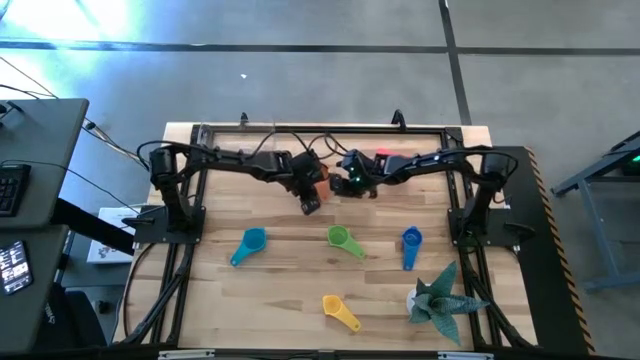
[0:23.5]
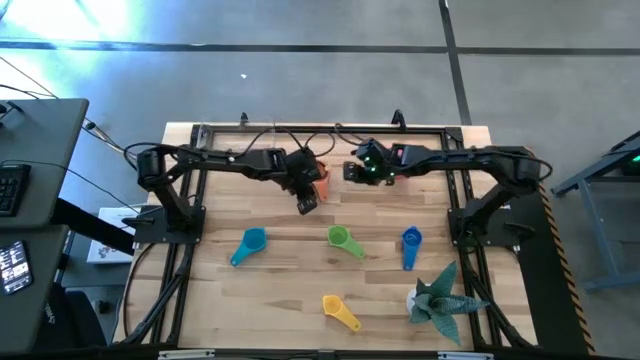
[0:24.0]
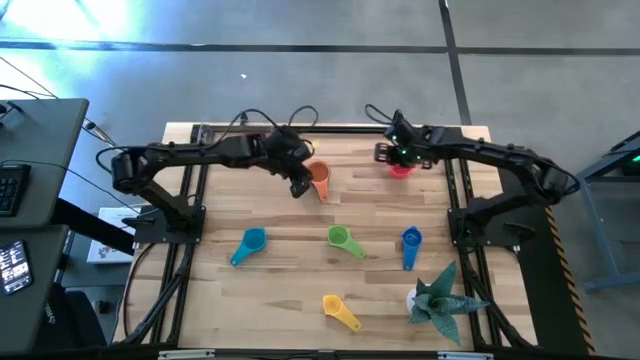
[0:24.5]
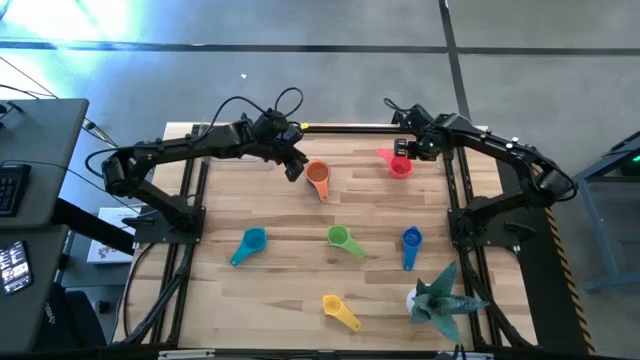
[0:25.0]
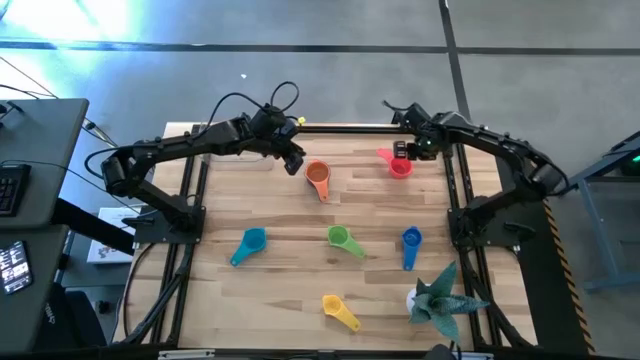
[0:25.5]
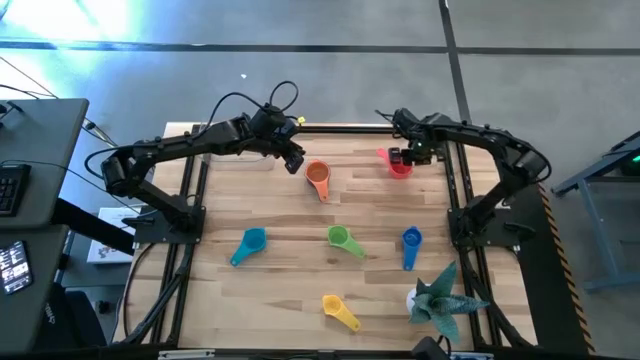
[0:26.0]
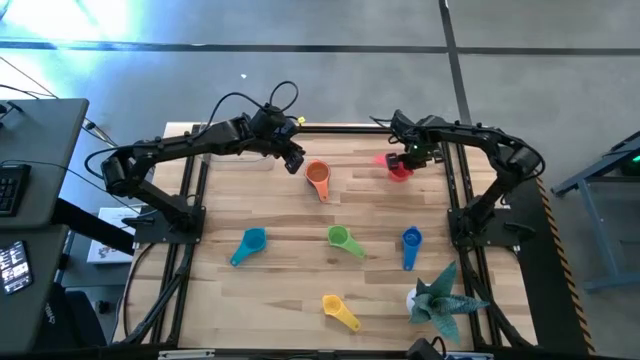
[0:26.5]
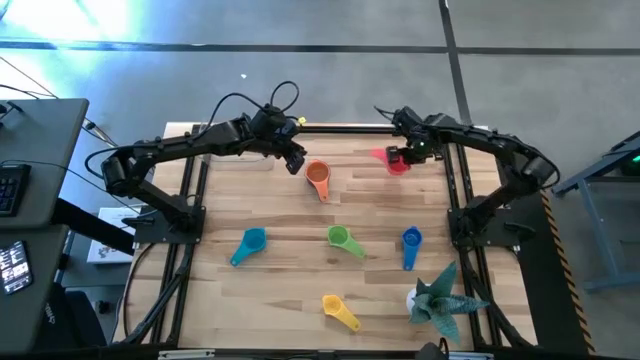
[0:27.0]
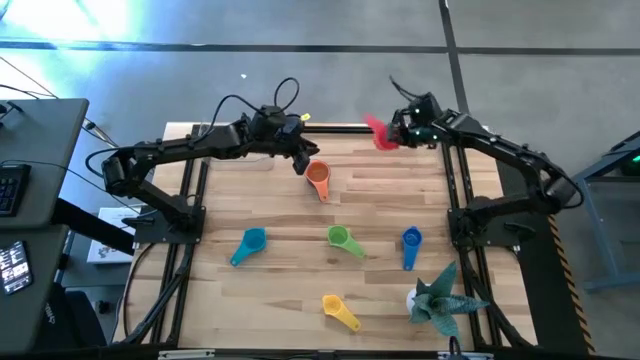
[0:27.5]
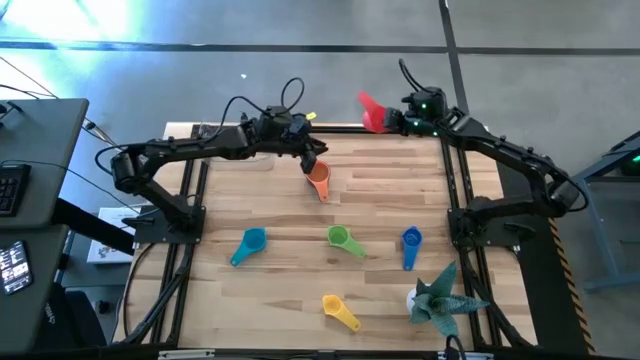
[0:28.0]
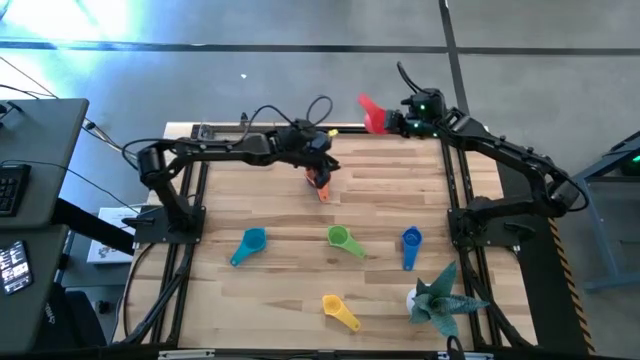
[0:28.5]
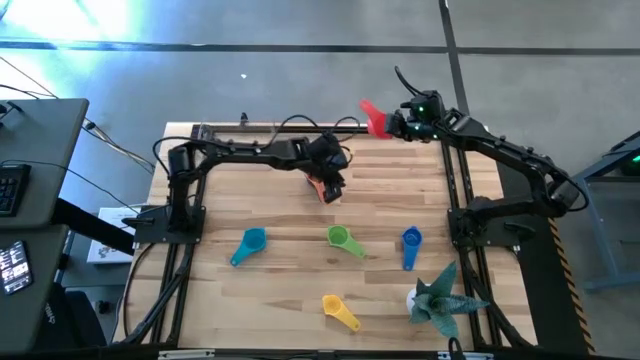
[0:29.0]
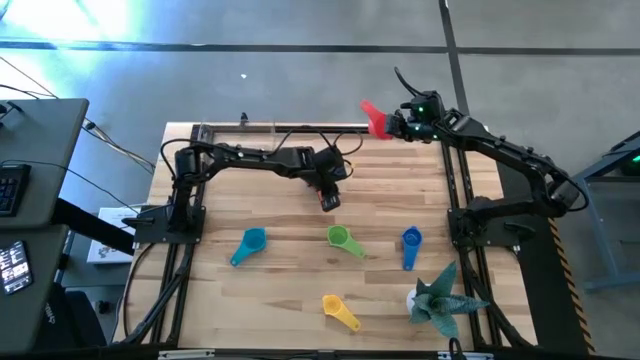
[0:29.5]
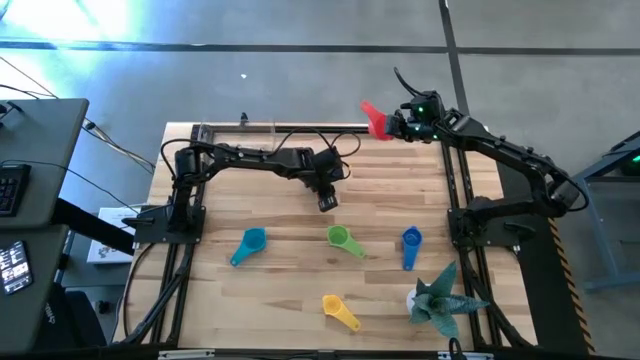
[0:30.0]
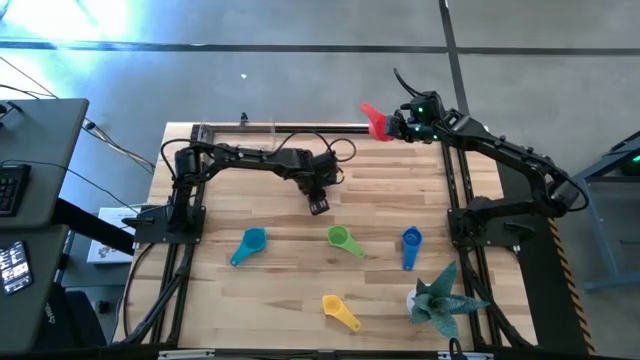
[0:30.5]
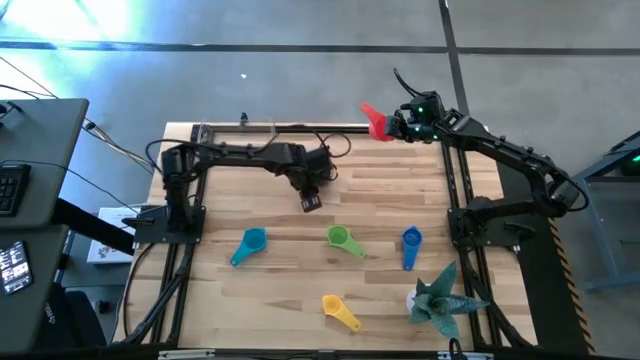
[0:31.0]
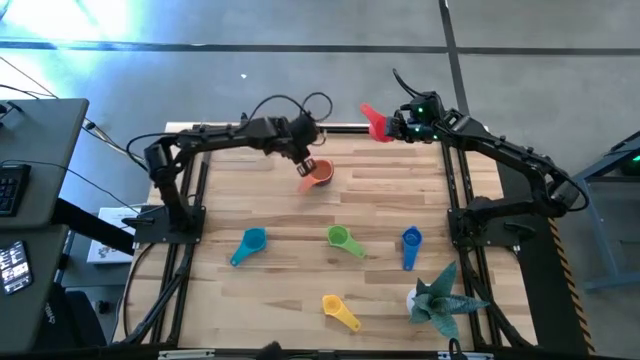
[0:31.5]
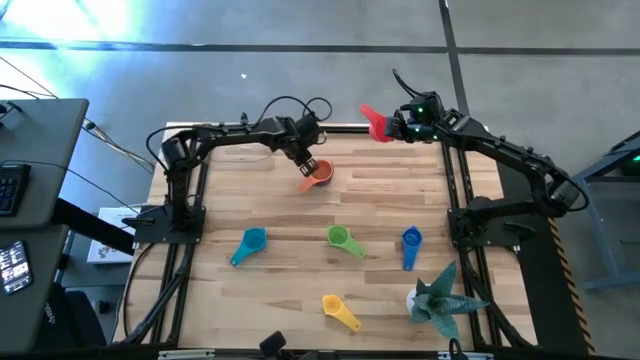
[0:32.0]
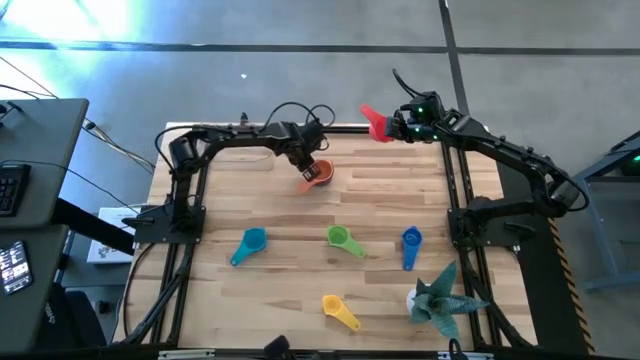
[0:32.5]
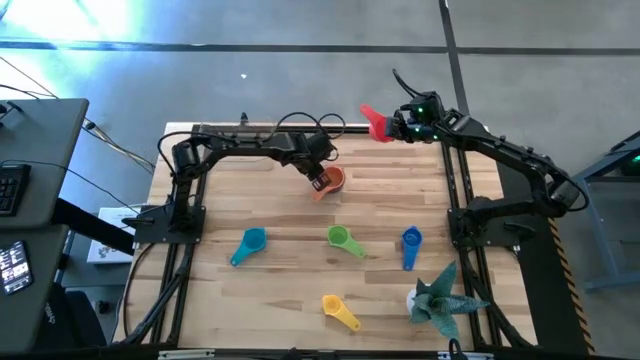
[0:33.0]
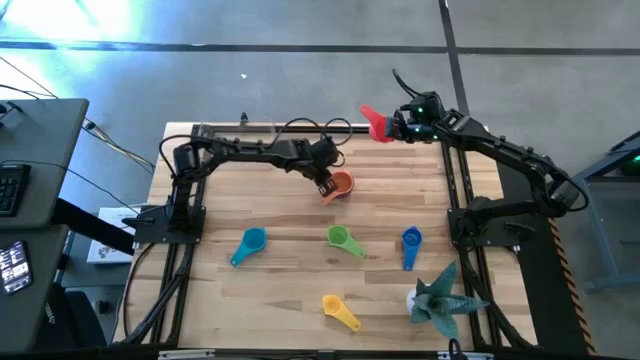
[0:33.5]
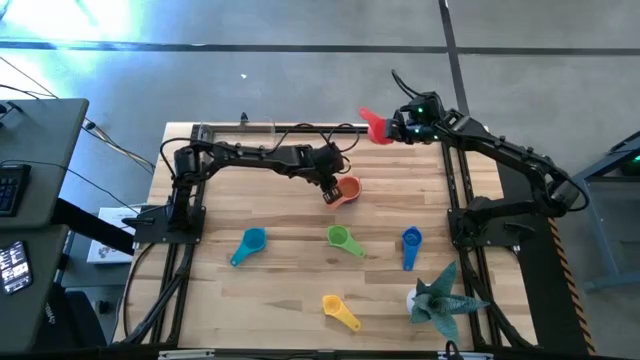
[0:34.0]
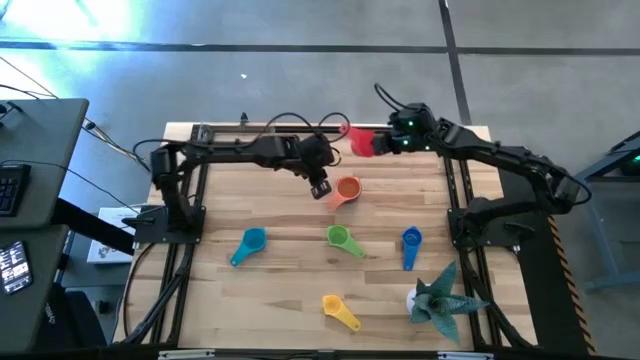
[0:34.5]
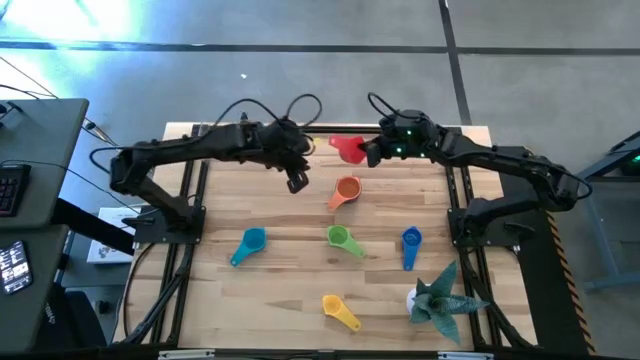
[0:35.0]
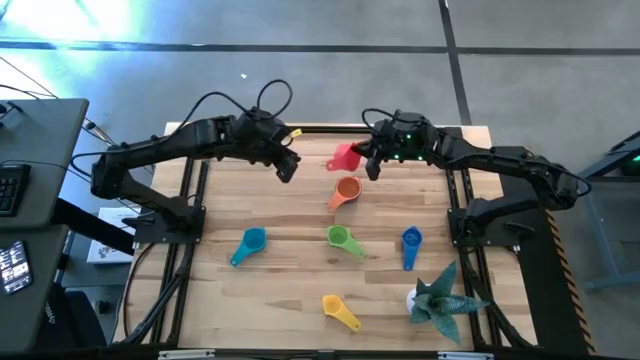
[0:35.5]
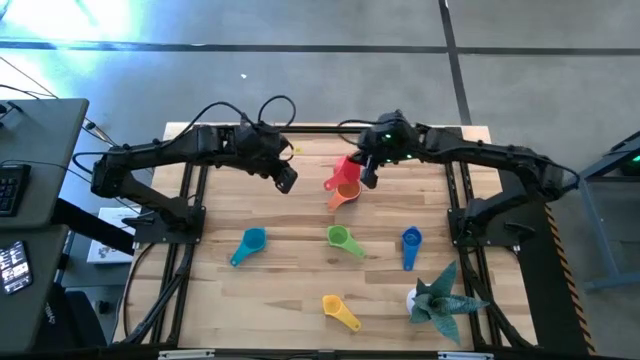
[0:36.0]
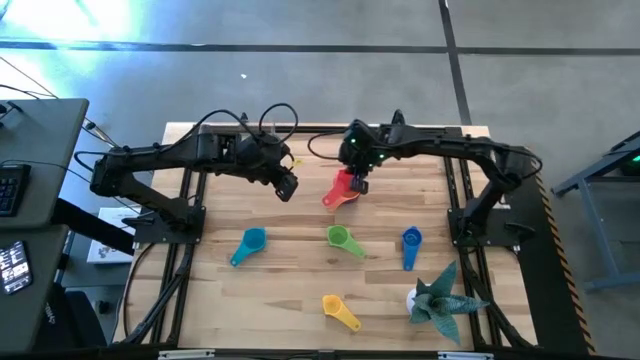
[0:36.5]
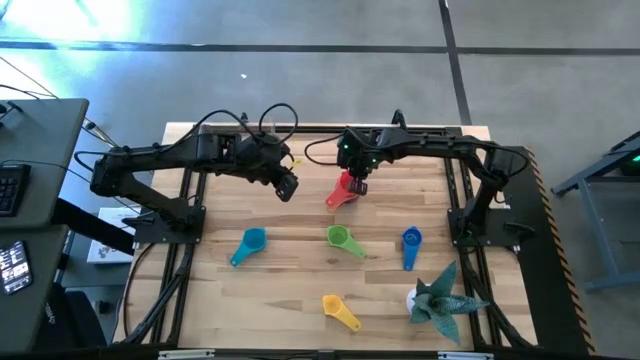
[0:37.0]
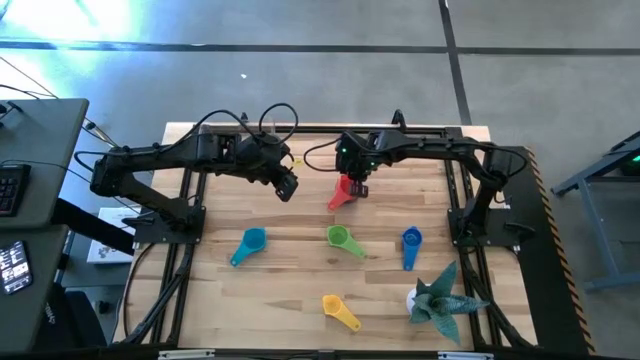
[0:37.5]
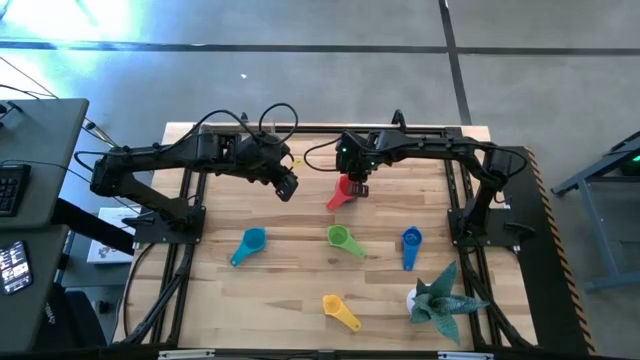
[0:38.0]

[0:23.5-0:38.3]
Task: Nest measuring cups in basket
Stack the red measuring cup on top of the orange measuring cup on the table
